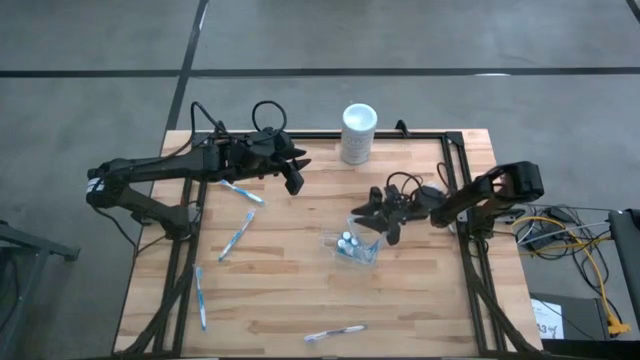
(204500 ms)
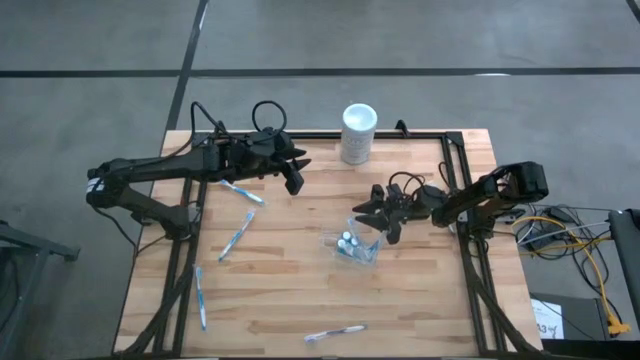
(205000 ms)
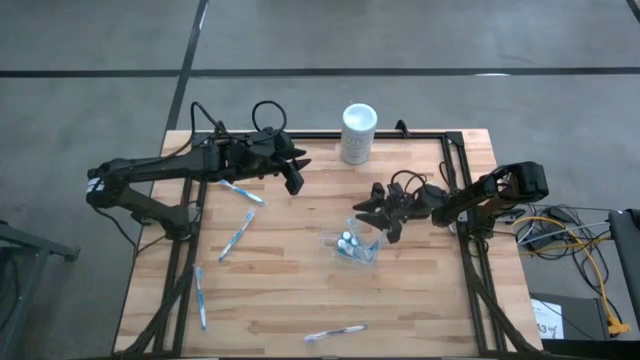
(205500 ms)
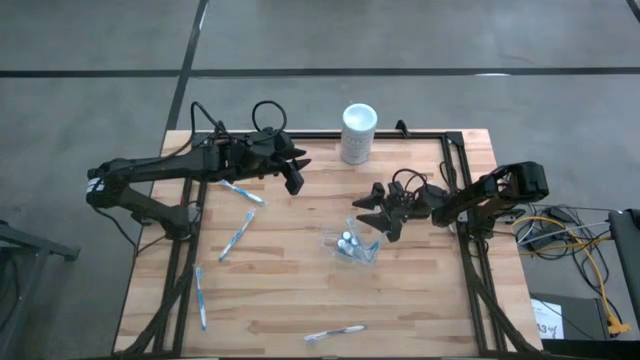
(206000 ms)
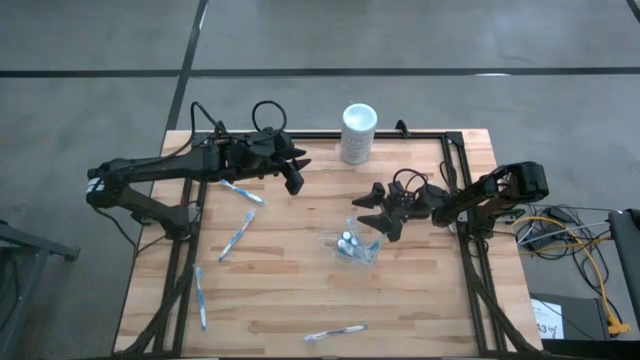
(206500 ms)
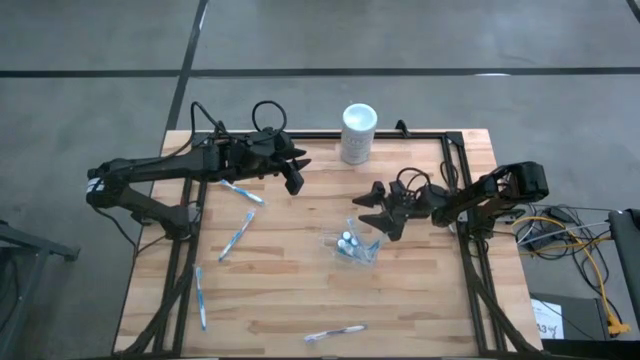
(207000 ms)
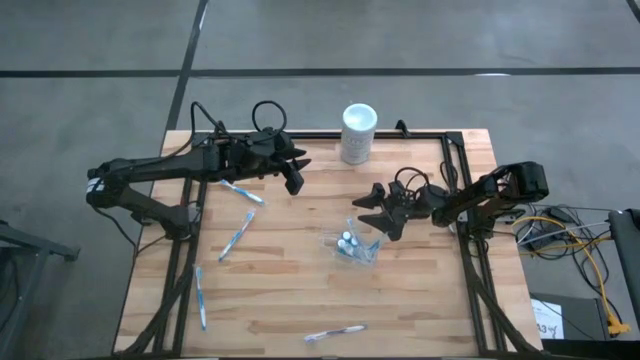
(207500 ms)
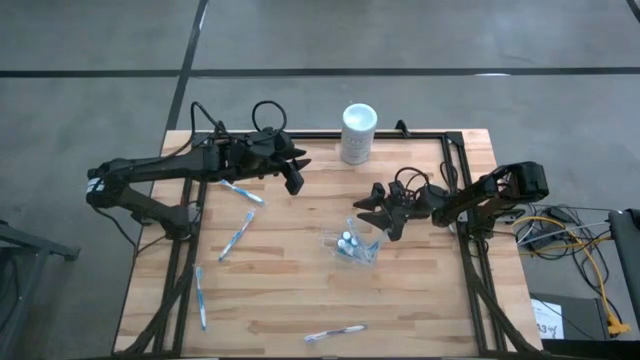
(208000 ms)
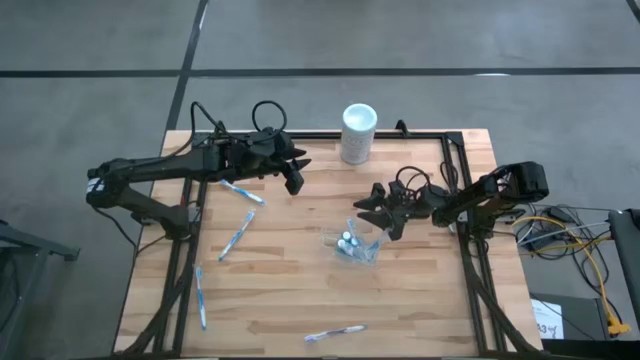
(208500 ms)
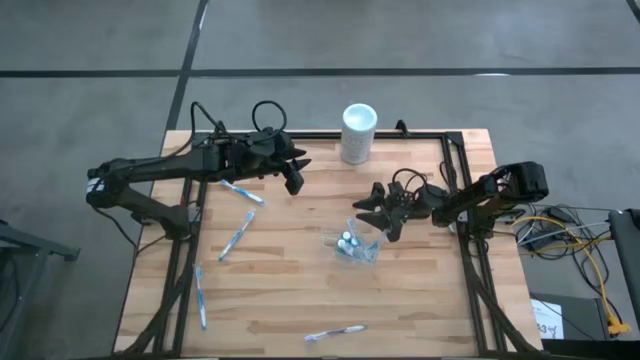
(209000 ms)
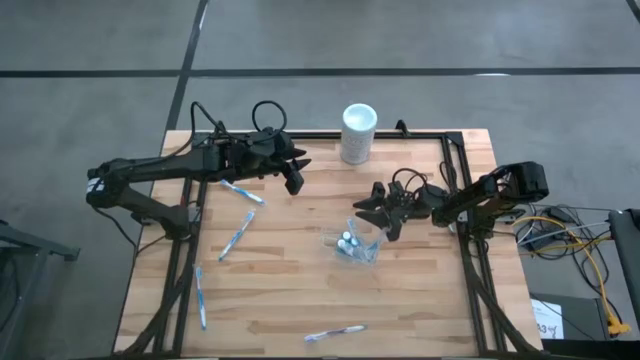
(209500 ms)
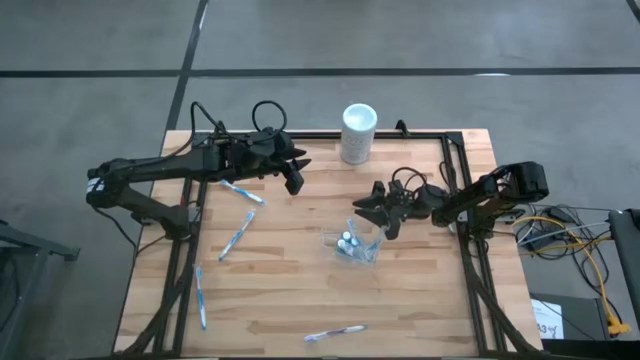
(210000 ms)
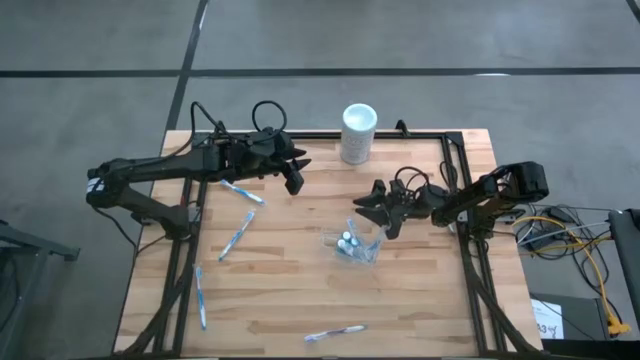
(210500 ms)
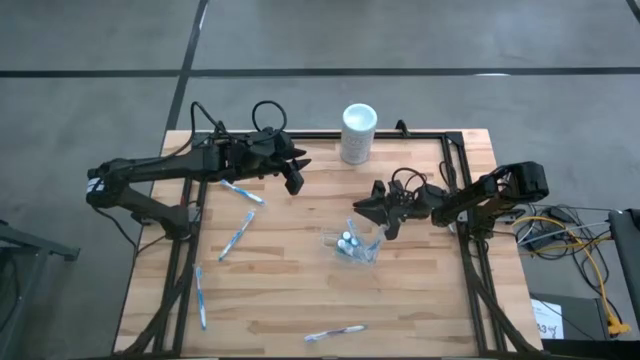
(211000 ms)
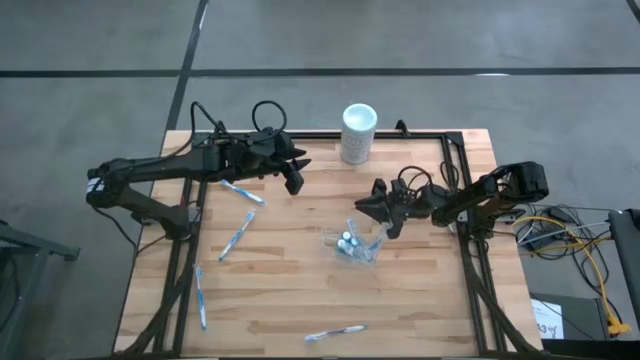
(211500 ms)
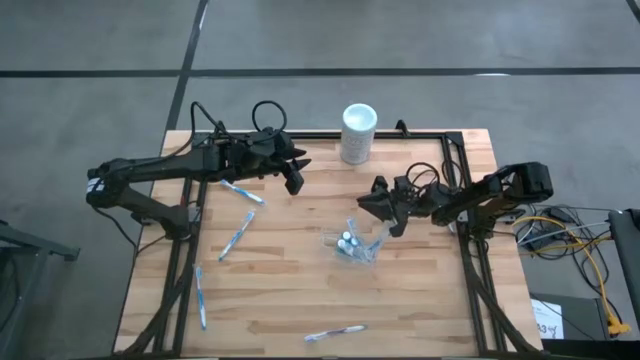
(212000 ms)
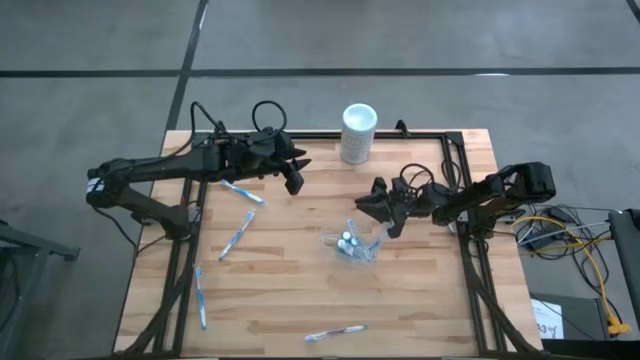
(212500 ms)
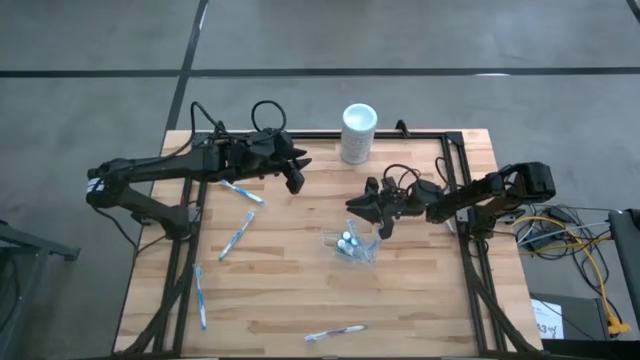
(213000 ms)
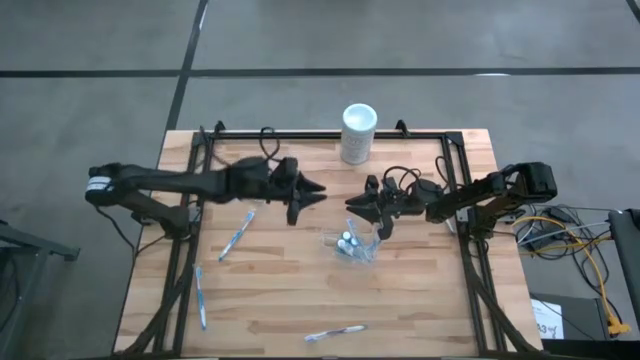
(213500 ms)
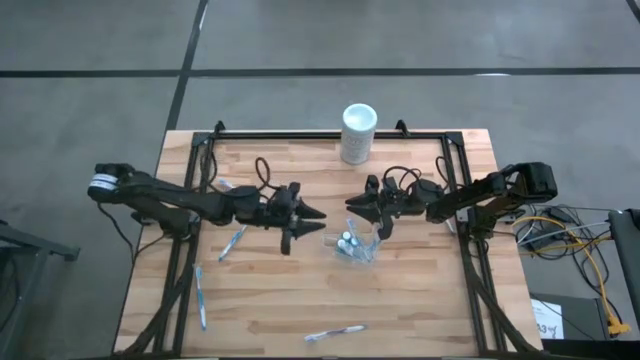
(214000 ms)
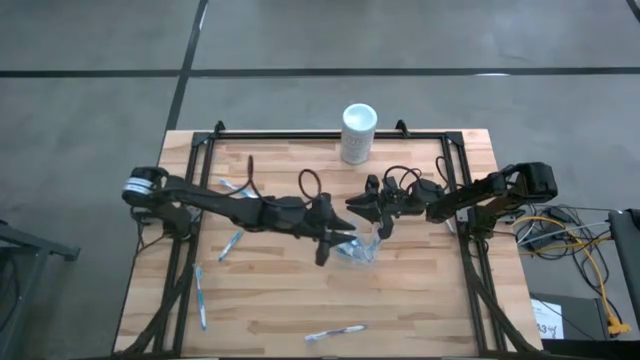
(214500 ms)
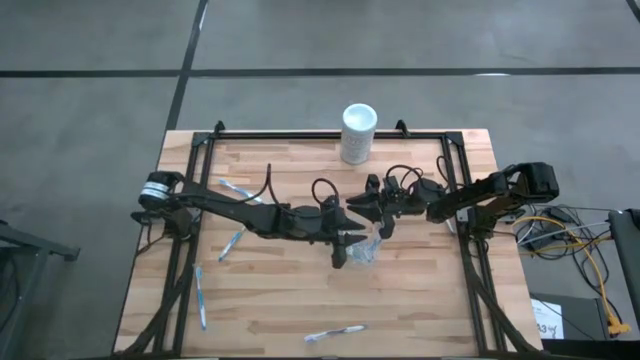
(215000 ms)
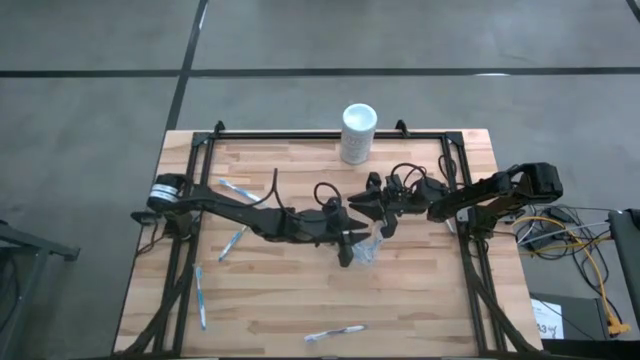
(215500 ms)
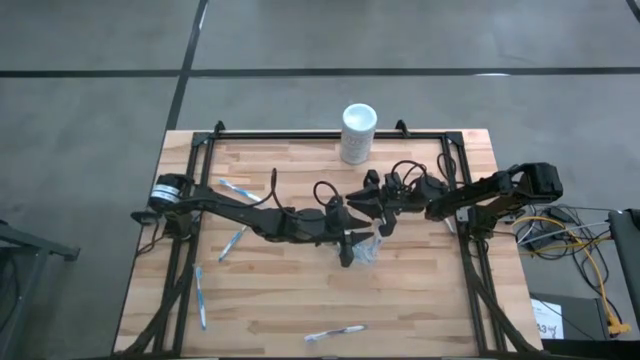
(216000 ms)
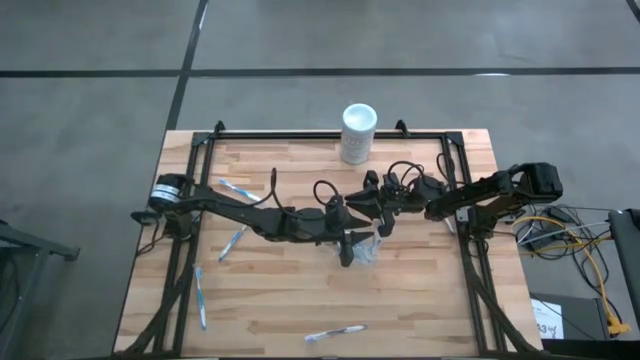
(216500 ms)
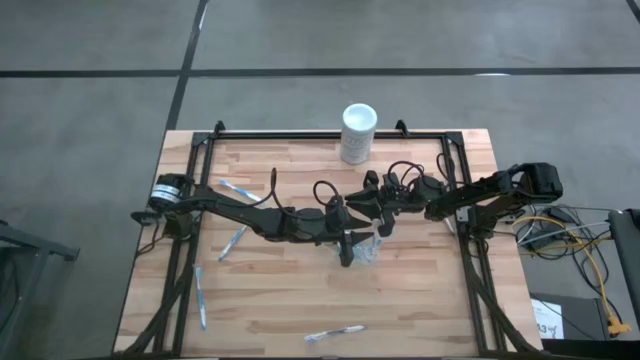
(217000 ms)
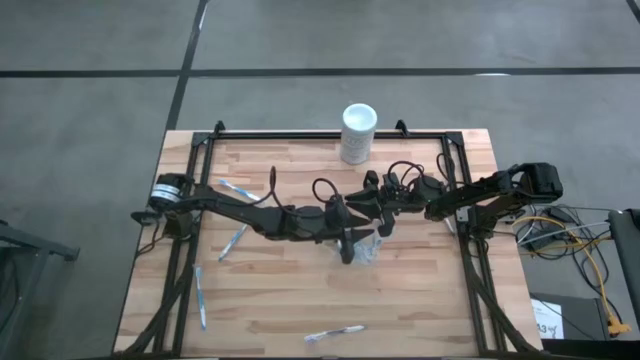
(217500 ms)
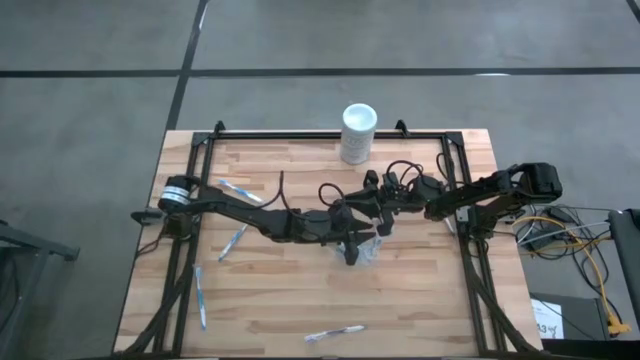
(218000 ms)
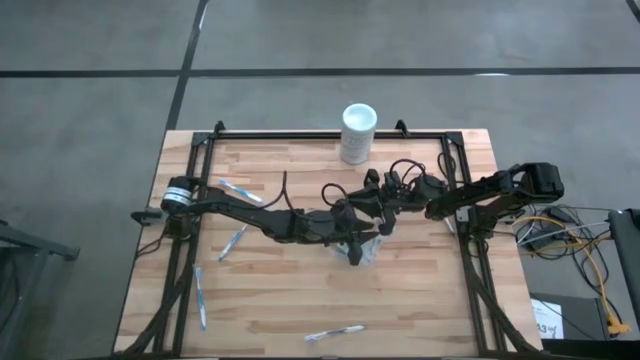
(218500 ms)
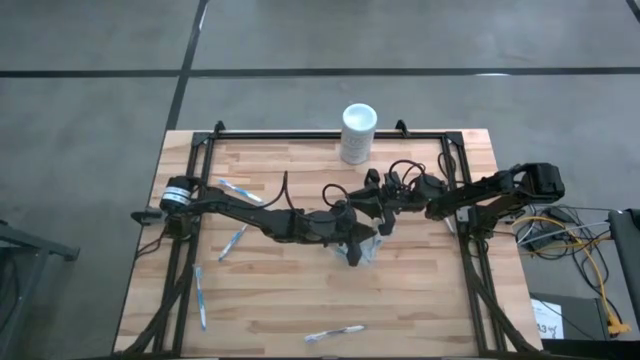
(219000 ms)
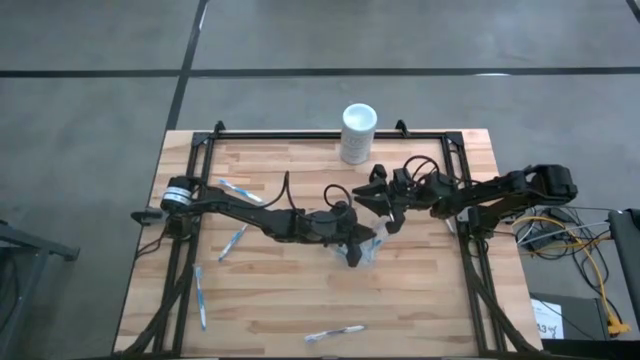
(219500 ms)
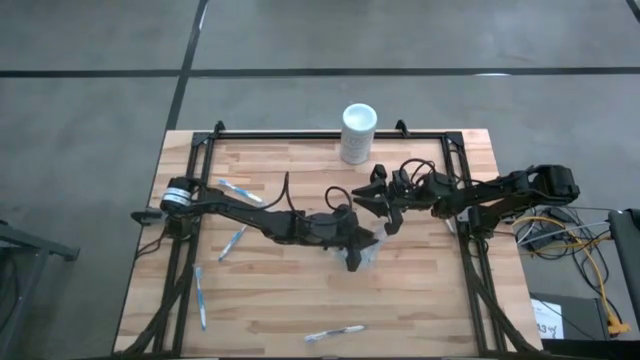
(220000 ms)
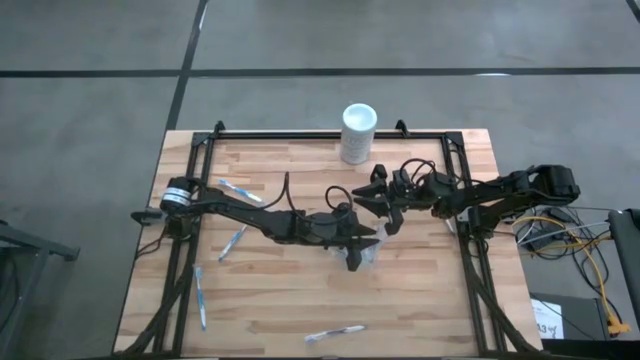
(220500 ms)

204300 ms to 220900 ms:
Task: Pick & Place toothbrushing station
Adjust the blue toothbrush in the transparent organizer

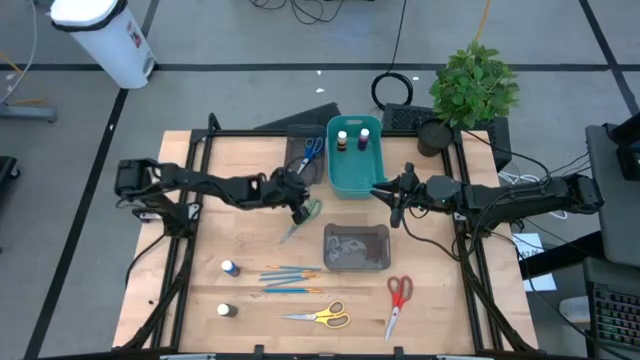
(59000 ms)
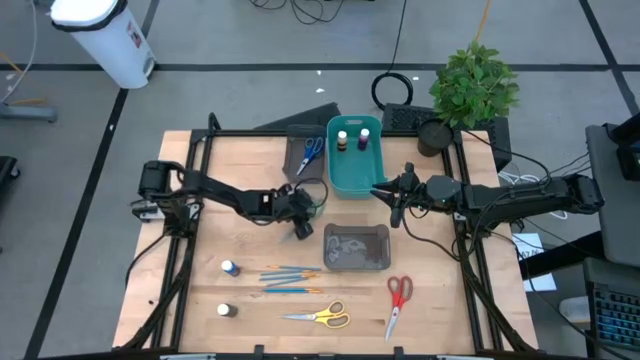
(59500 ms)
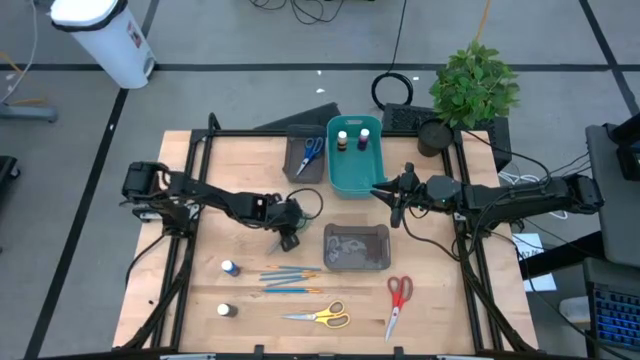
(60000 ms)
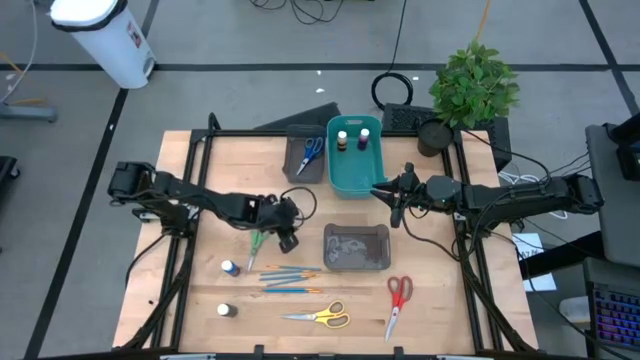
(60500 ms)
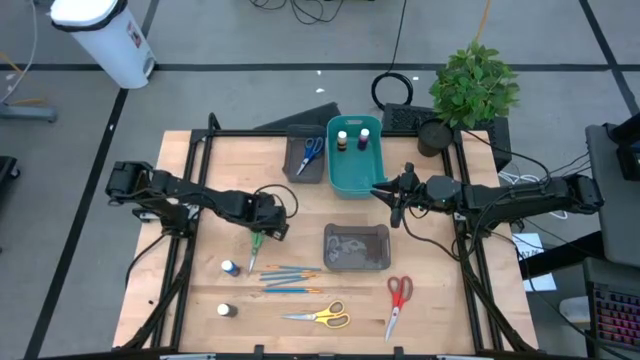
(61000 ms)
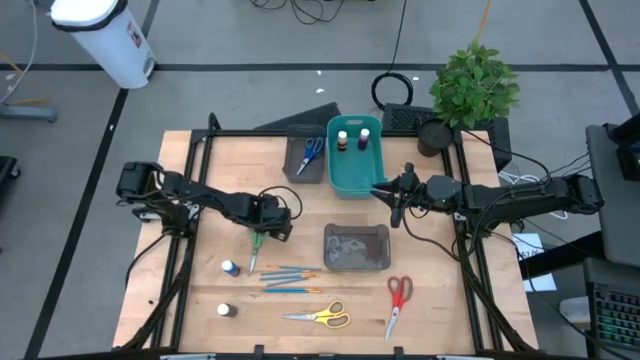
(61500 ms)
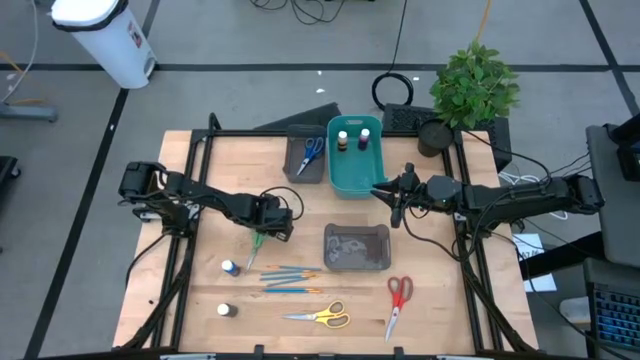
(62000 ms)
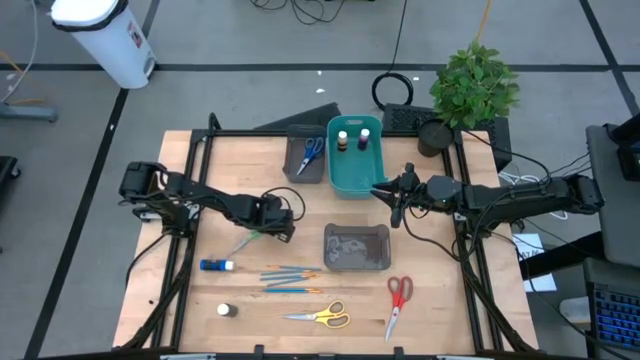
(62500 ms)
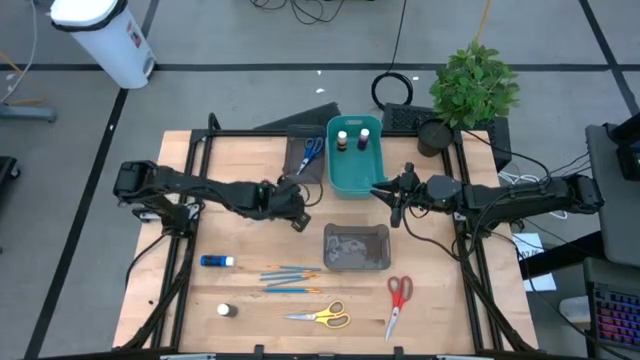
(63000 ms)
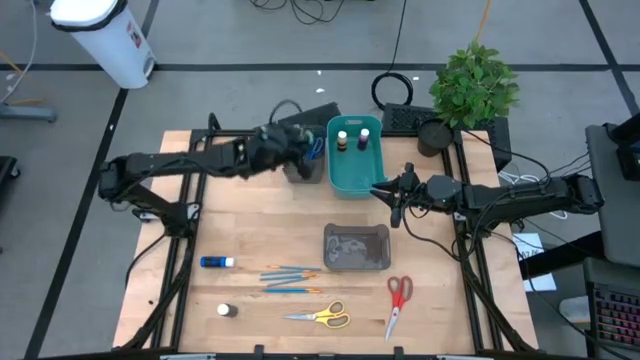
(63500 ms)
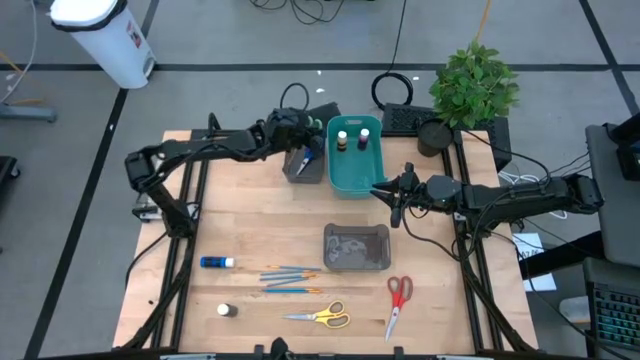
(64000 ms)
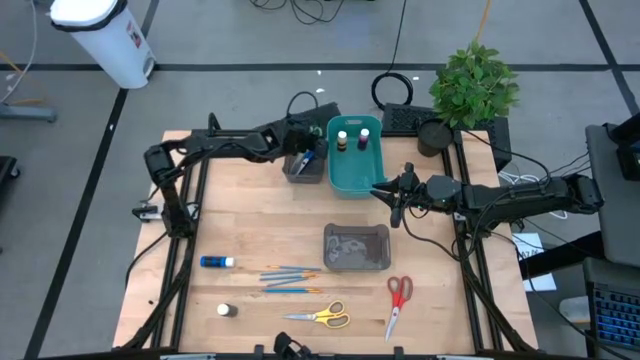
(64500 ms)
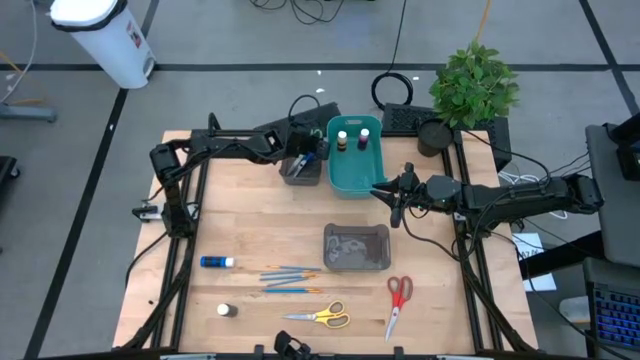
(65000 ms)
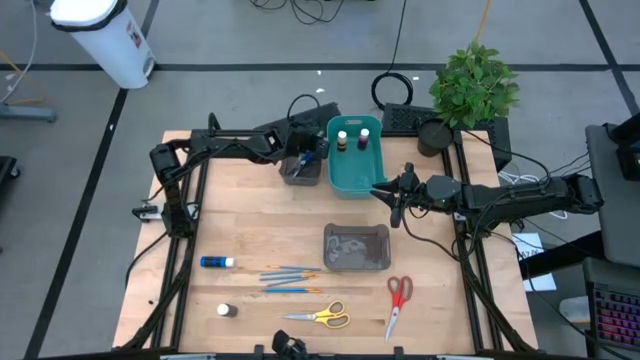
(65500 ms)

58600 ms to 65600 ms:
Task: Pick & Place Paint Supplies
Put the green scissors into the top black bin
